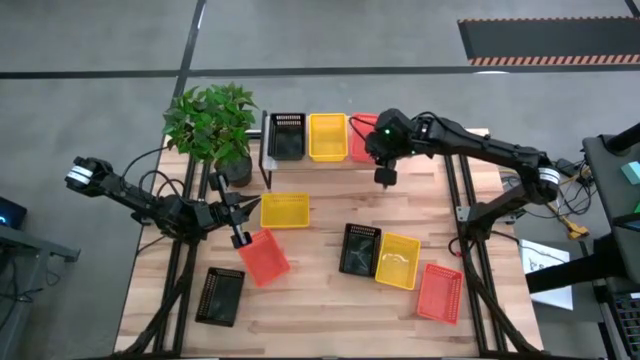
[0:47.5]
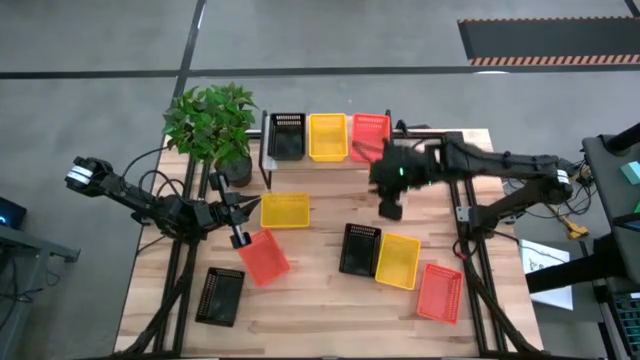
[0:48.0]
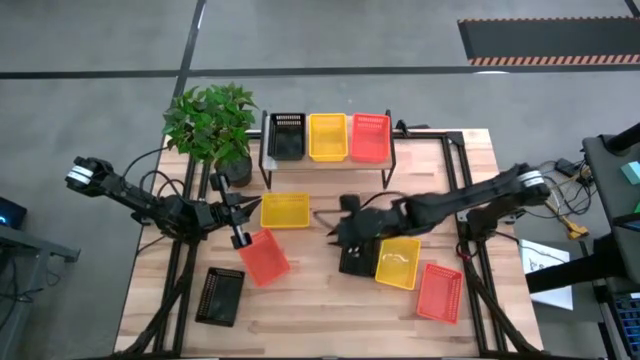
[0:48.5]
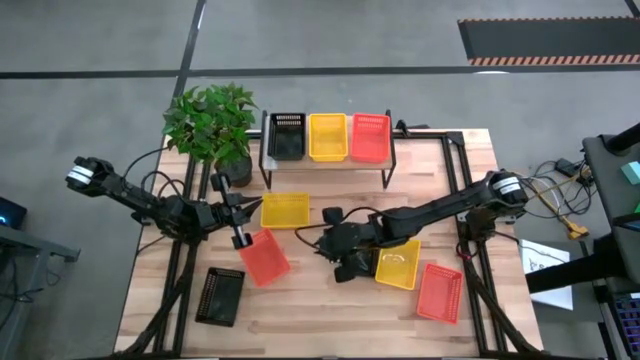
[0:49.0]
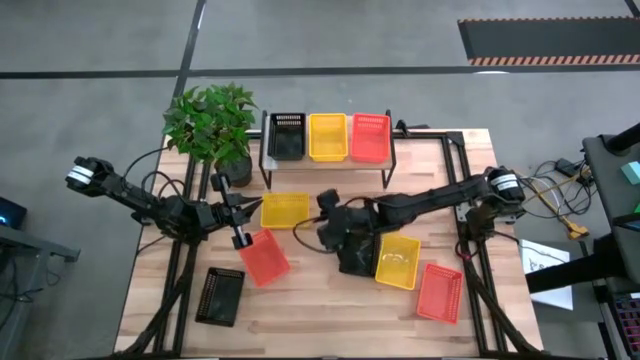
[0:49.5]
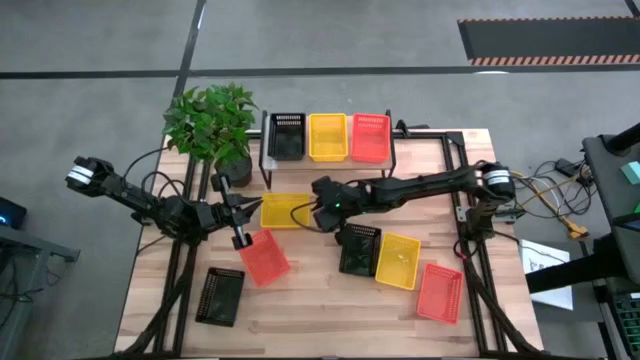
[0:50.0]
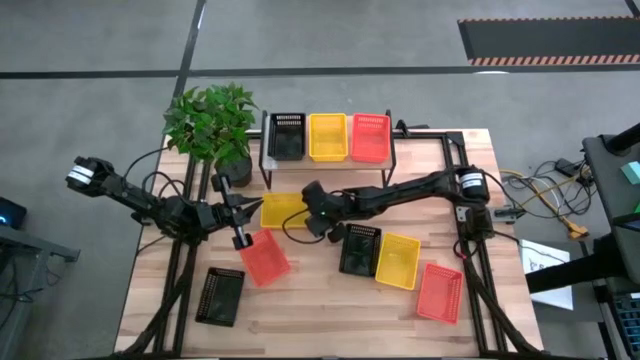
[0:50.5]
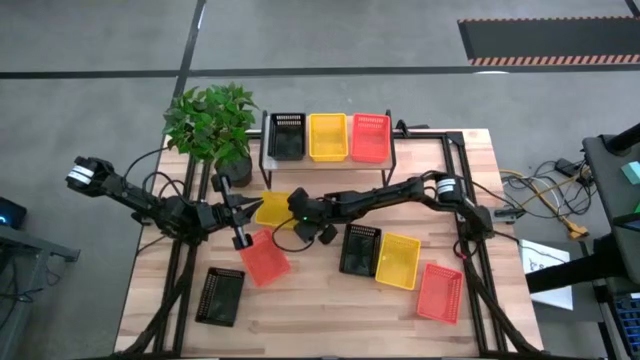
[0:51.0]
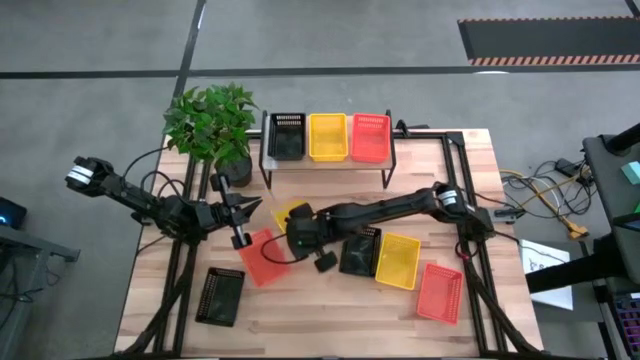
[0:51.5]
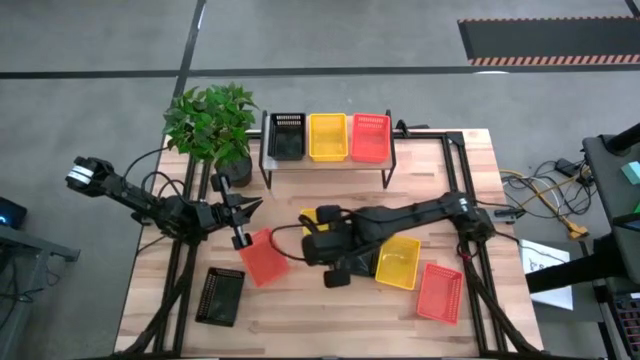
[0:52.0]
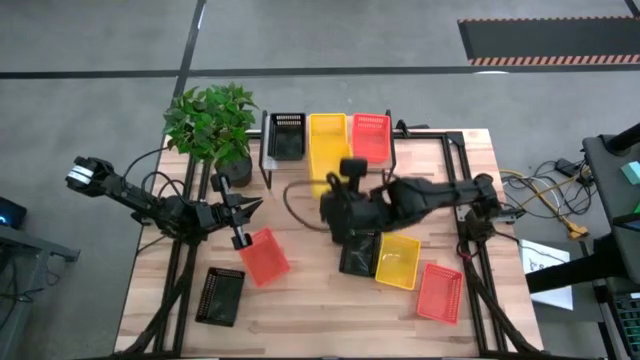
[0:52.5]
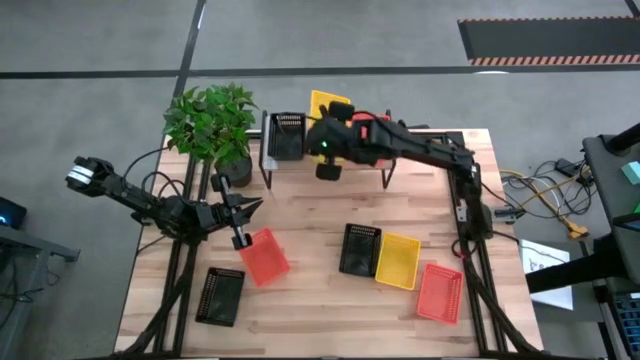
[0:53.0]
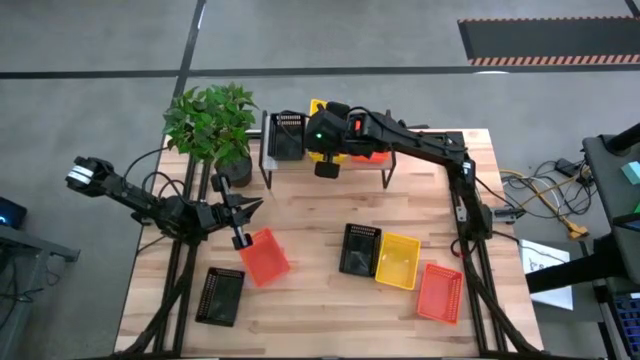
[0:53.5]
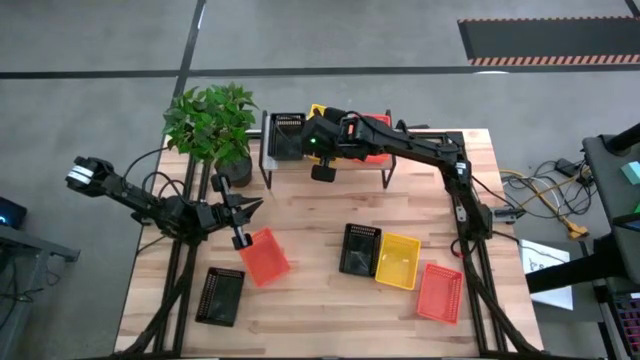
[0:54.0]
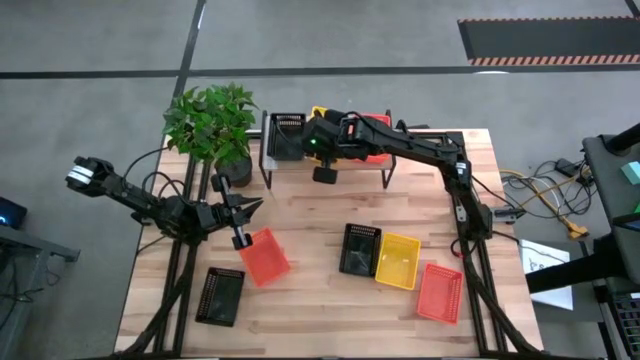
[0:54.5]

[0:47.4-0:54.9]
Task: Stack baskets on shelf by color
Stack the left yellow bin on top of the other yellow bin on the shelf

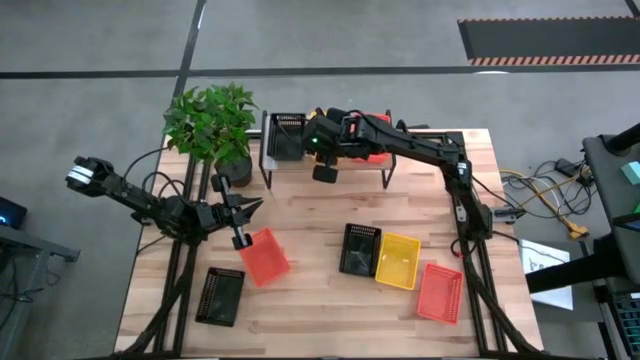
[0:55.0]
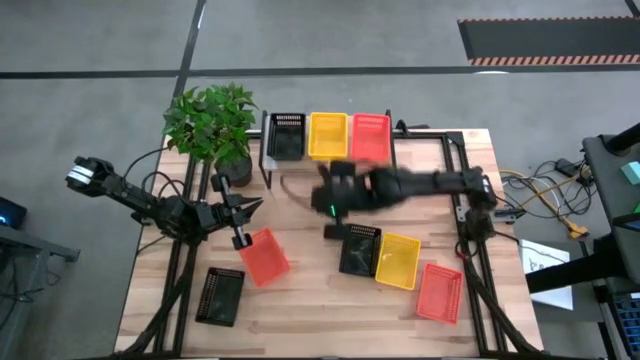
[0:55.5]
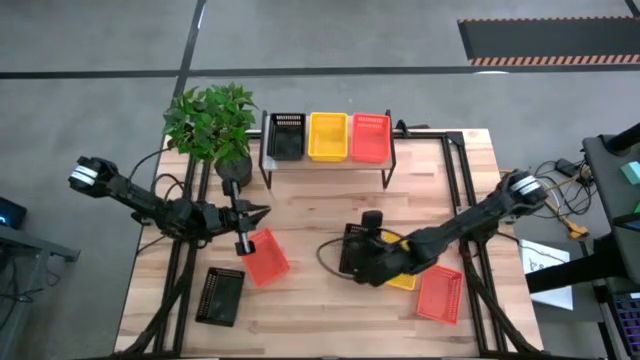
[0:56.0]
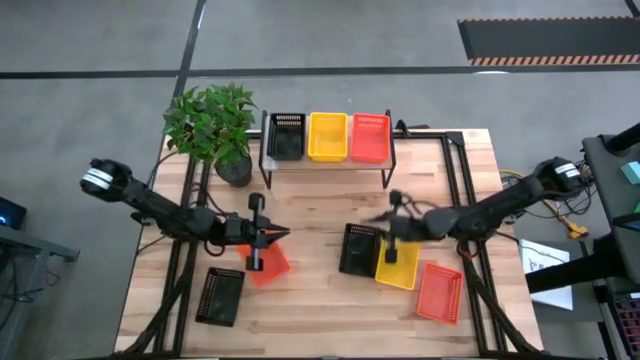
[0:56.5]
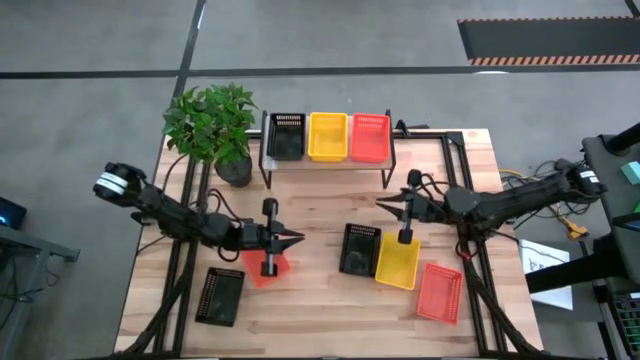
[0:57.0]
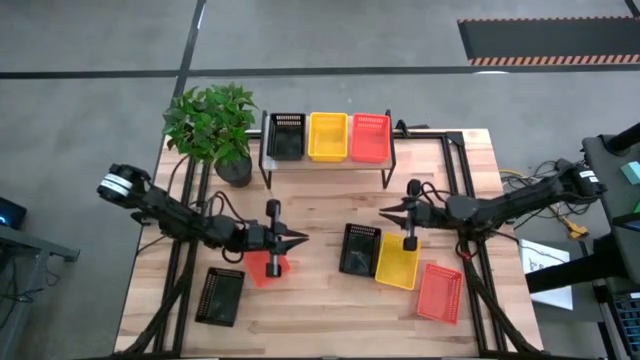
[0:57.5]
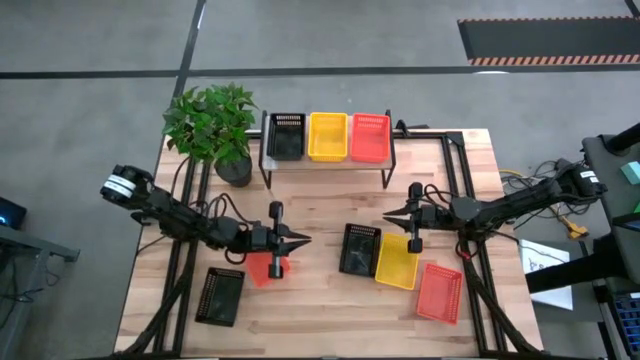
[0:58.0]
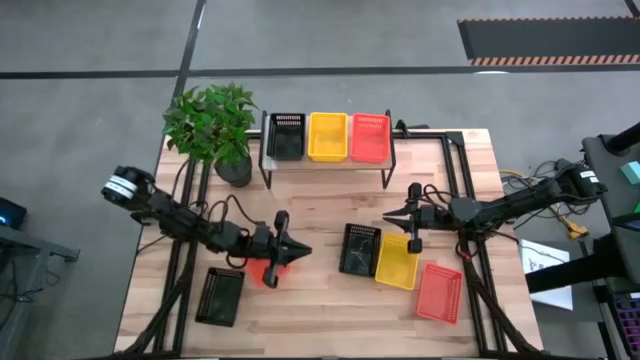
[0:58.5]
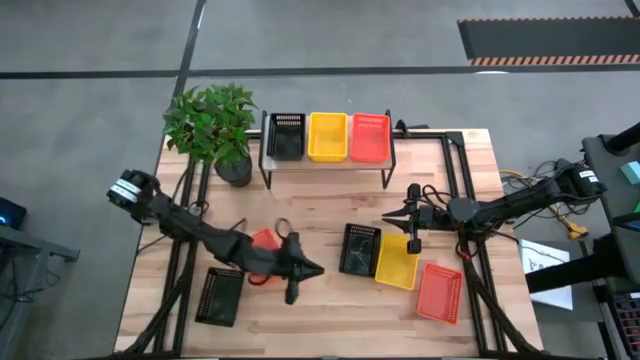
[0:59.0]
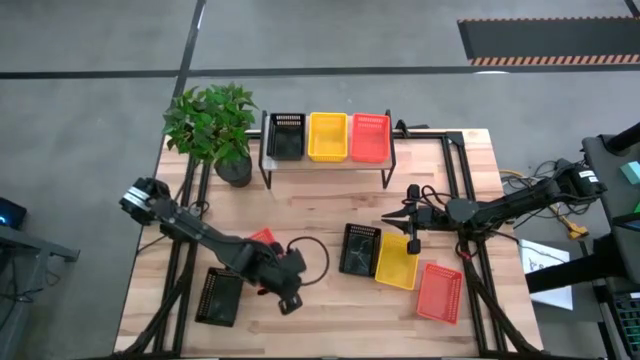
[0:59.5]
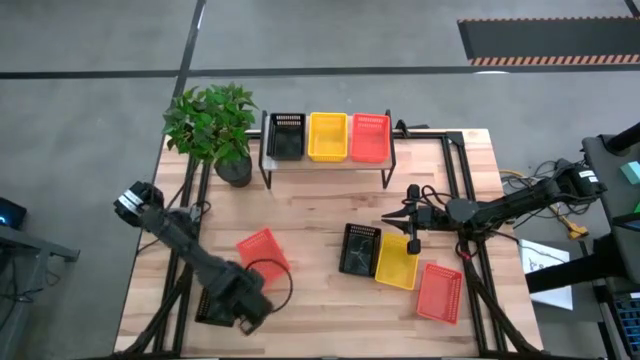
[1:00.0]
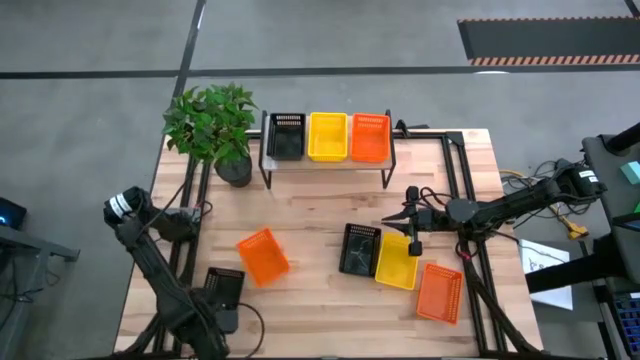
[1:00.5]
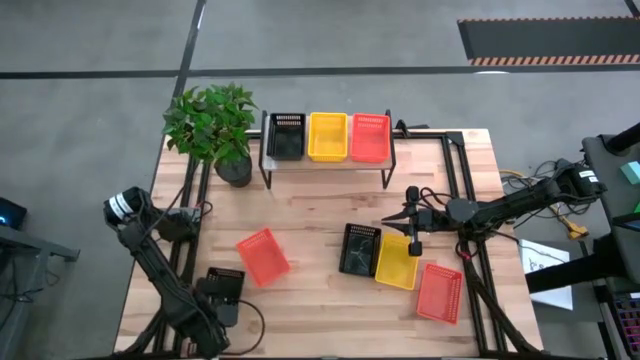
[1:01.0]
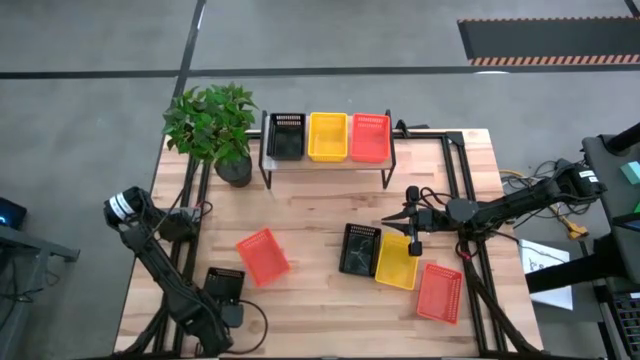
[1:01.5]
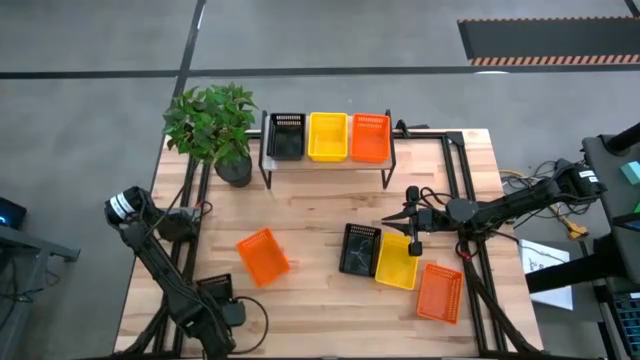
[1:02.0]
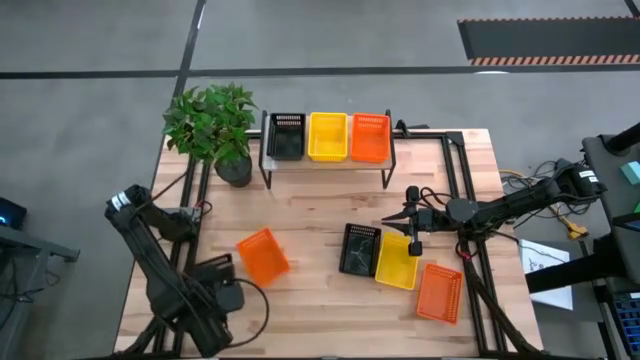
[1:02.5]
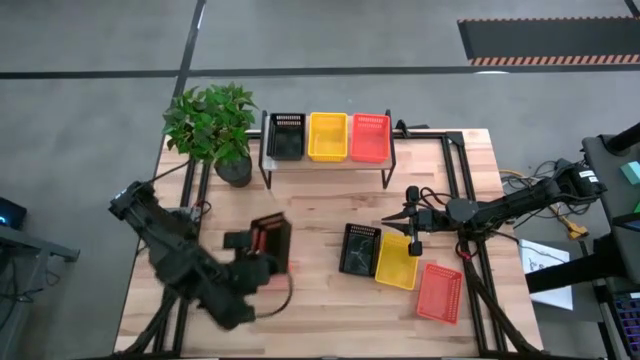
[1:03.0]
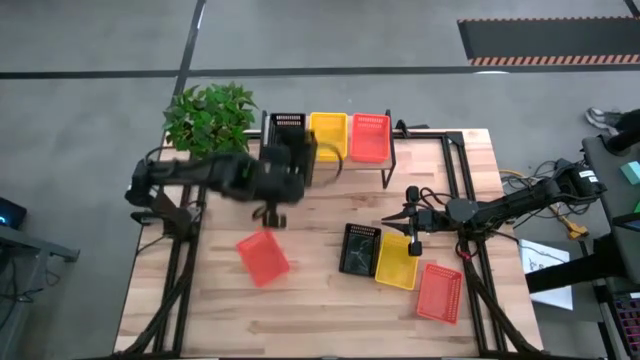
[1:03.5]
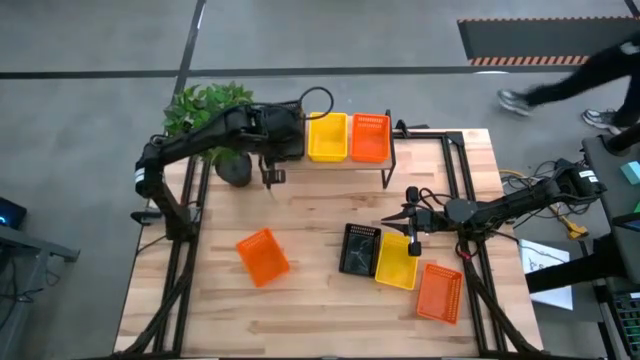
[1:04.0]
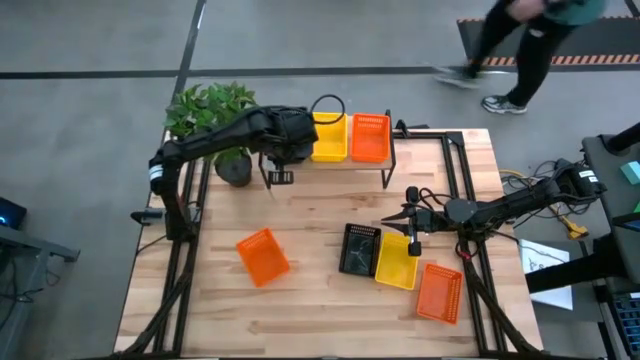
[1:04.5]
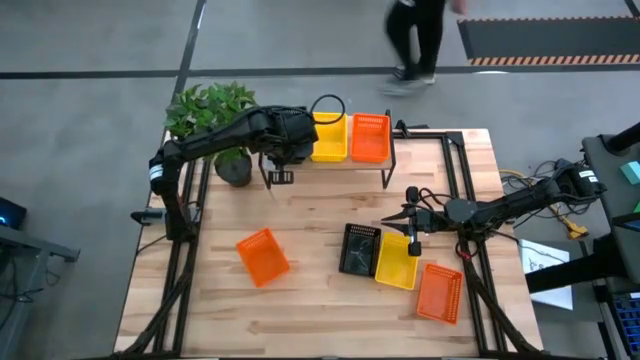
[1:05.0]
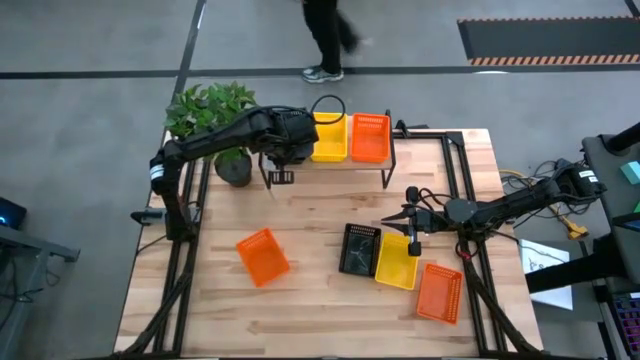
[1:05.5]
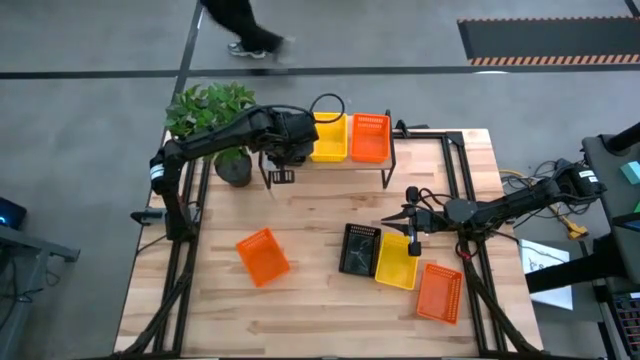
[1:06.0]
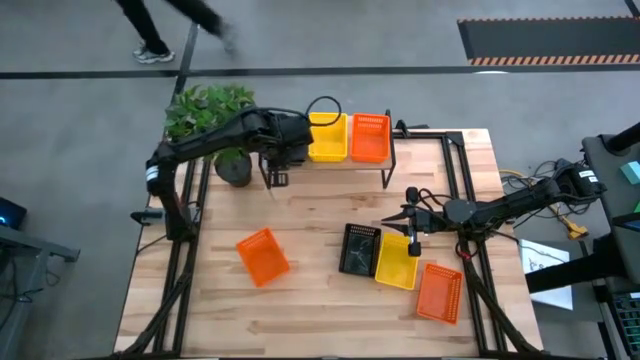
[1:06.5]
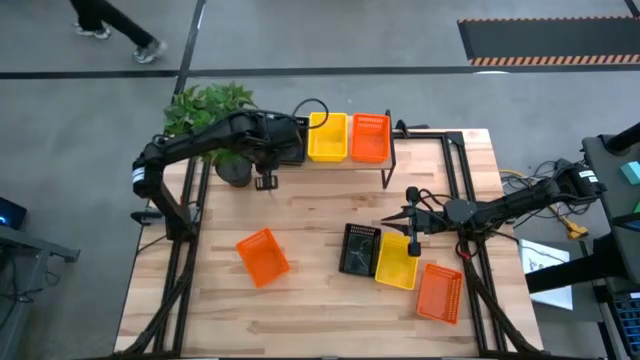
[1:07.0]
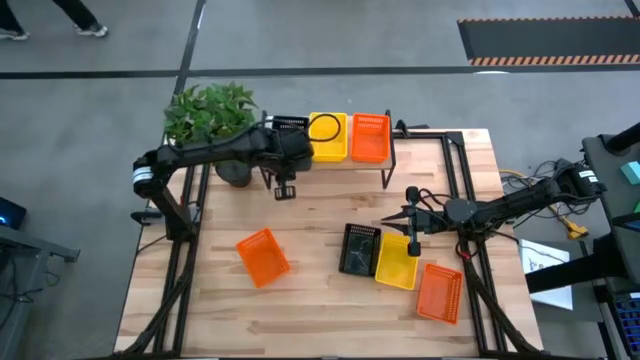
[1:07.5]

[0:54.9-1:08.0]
Stack the left black bin on top of the other black bin on the shelf

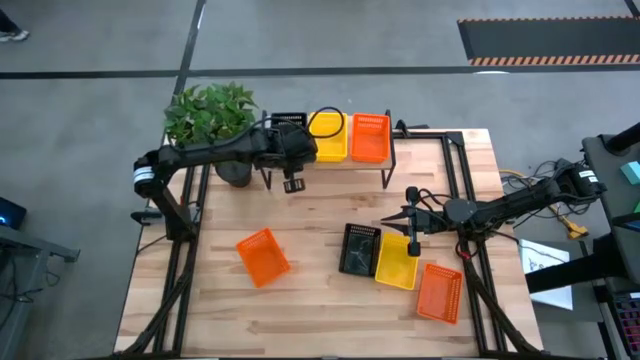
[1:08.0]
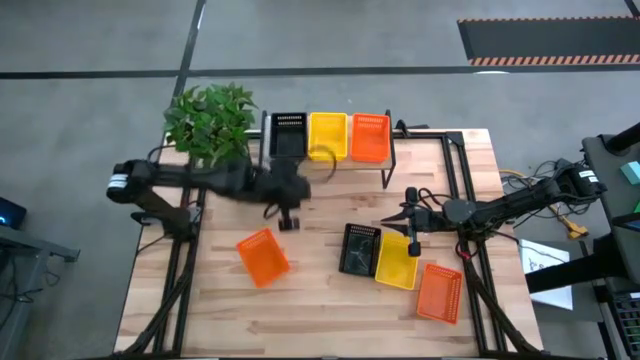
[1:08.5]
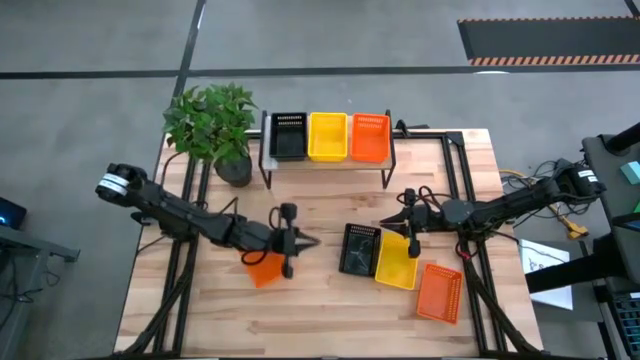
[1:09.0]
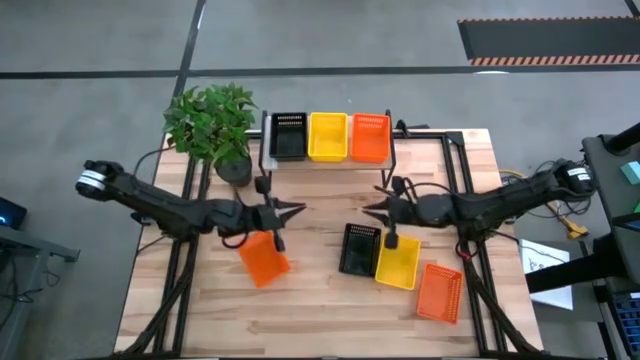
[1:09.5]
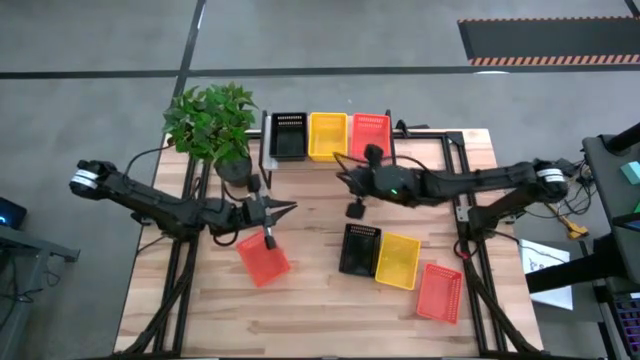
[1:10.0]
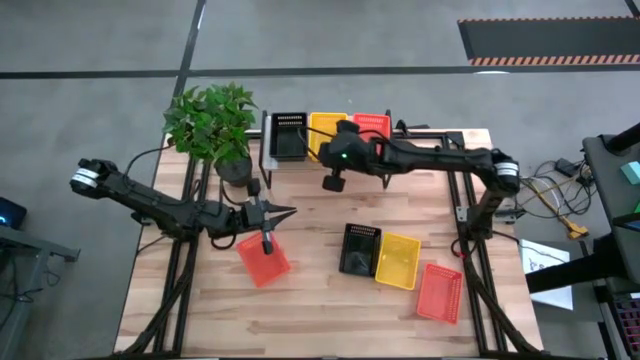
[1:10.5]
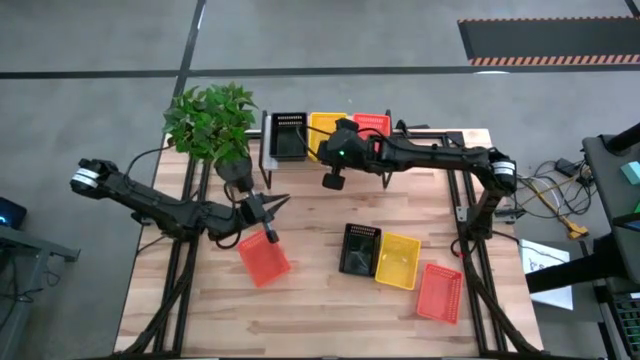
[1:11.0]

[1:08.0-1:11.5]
Adjust the yellow bins on the shelf
